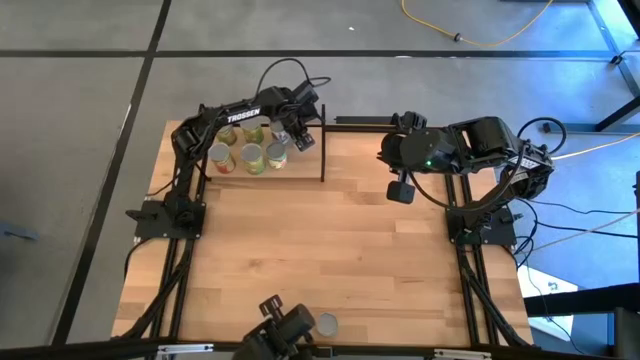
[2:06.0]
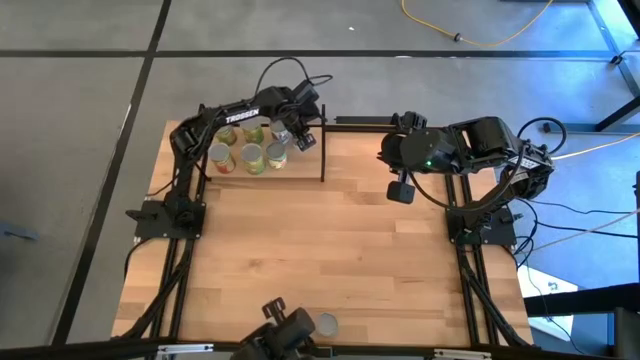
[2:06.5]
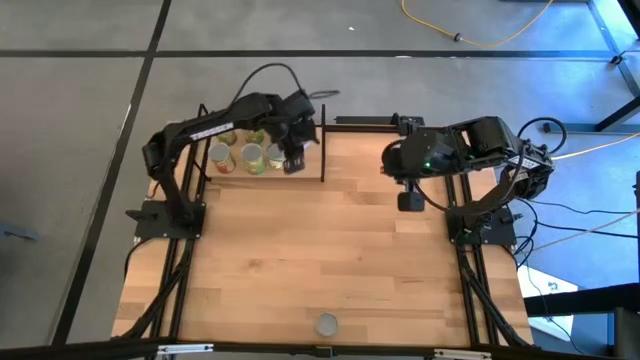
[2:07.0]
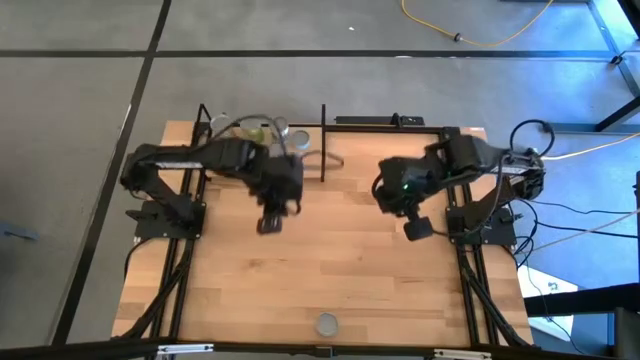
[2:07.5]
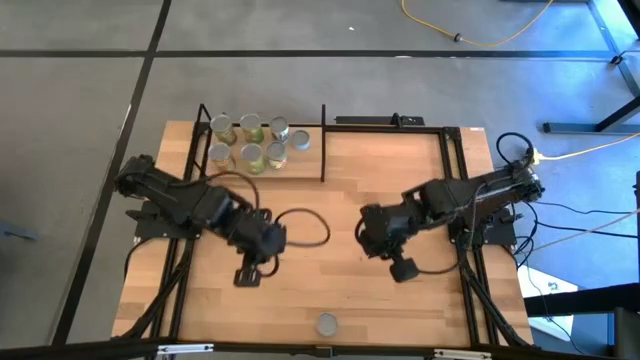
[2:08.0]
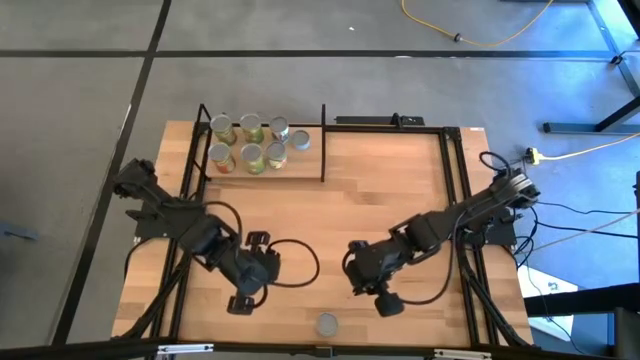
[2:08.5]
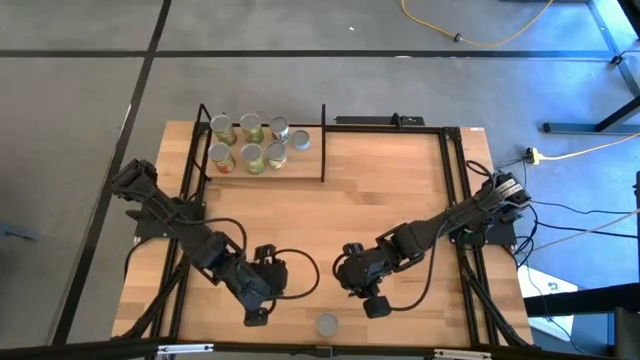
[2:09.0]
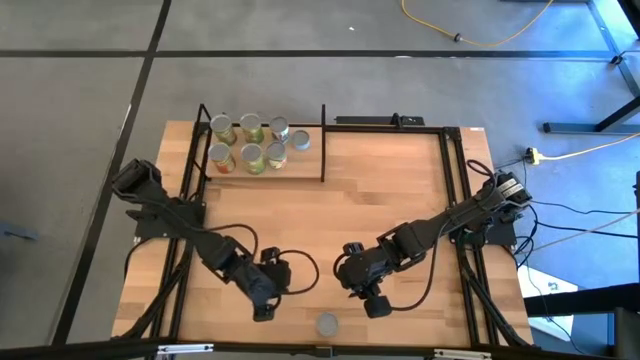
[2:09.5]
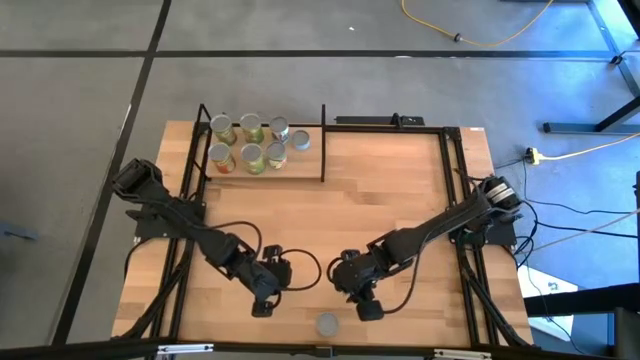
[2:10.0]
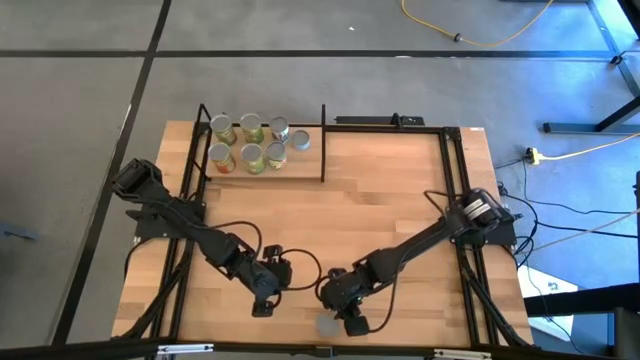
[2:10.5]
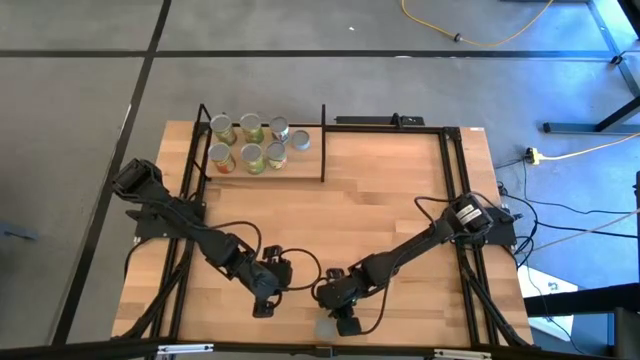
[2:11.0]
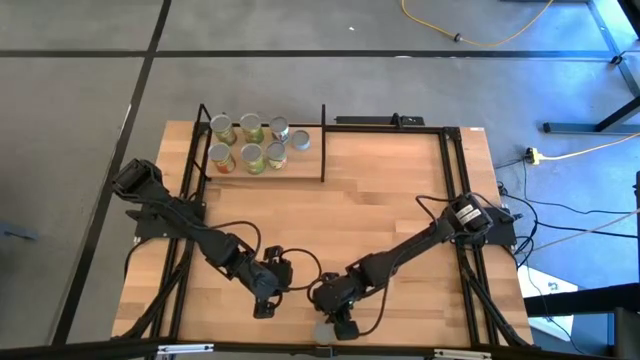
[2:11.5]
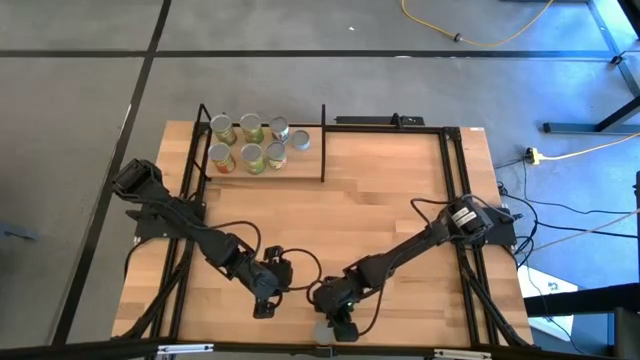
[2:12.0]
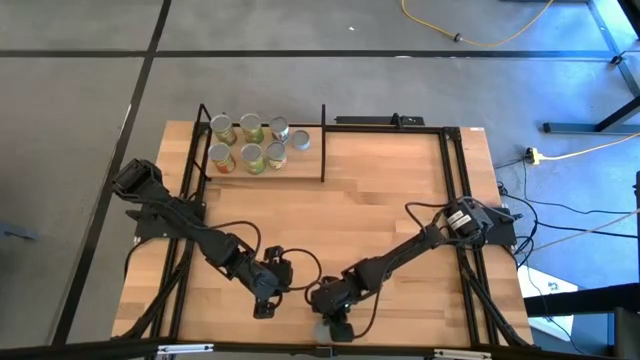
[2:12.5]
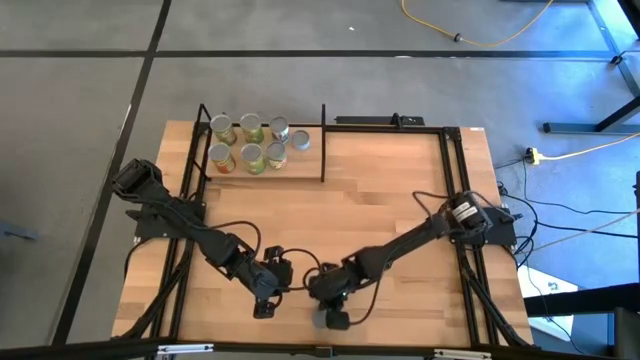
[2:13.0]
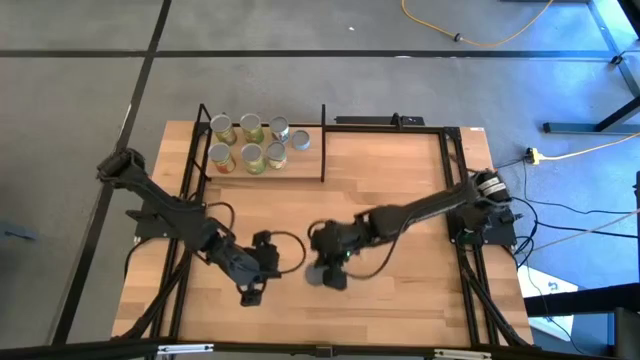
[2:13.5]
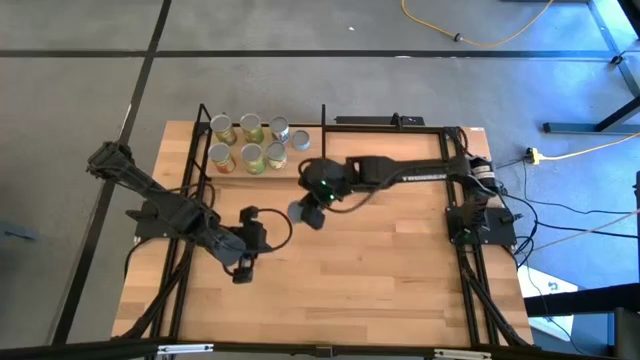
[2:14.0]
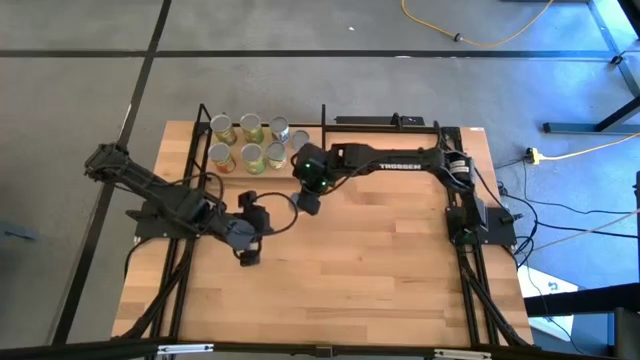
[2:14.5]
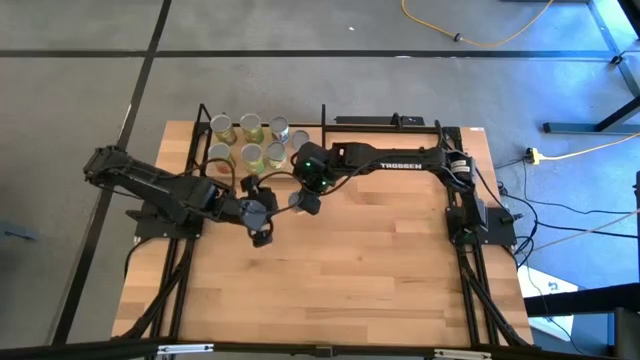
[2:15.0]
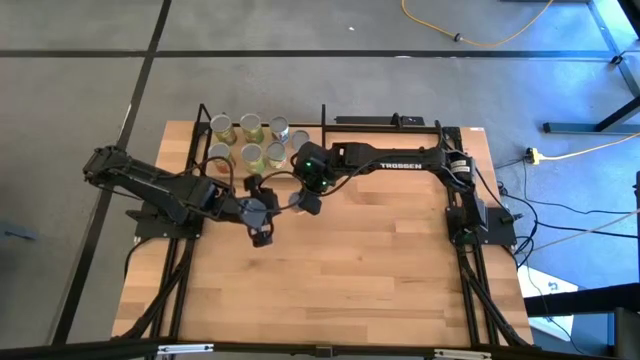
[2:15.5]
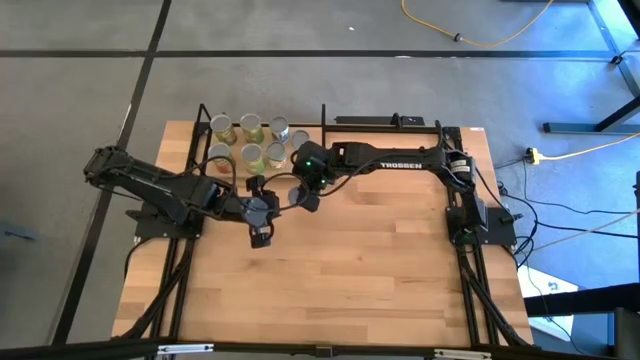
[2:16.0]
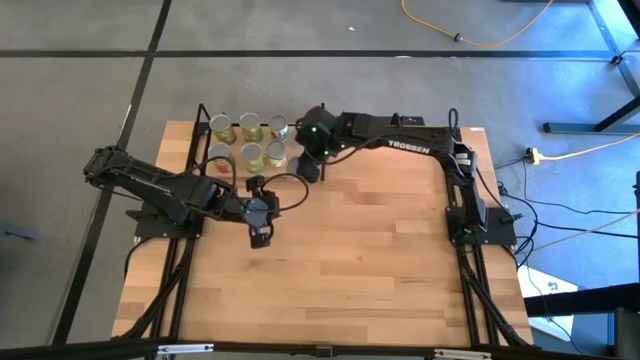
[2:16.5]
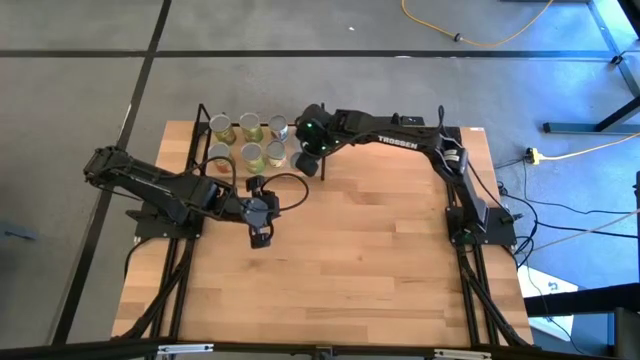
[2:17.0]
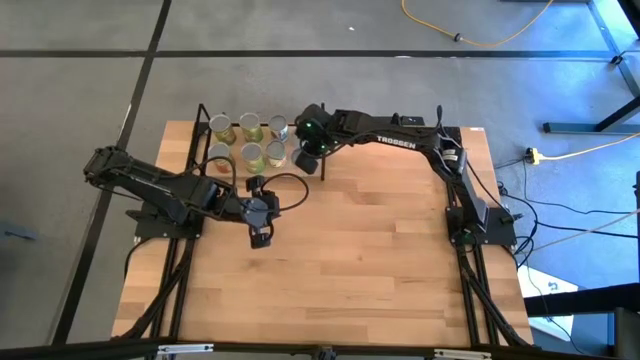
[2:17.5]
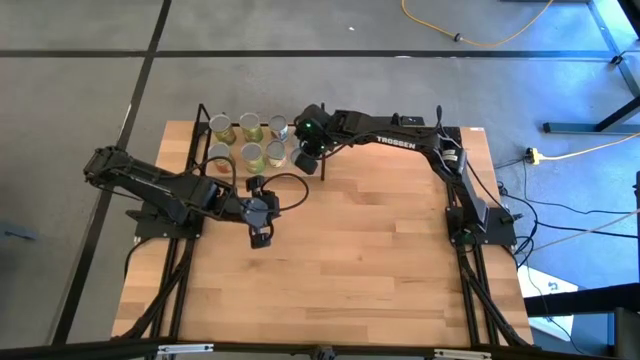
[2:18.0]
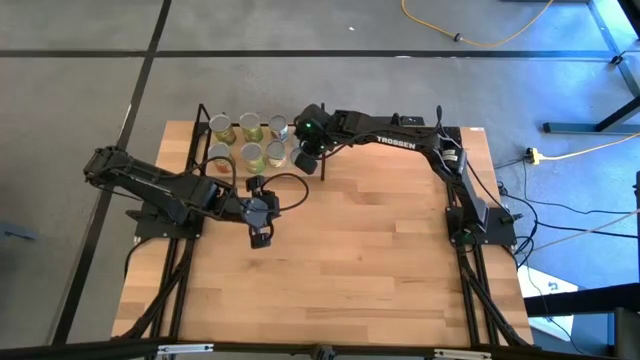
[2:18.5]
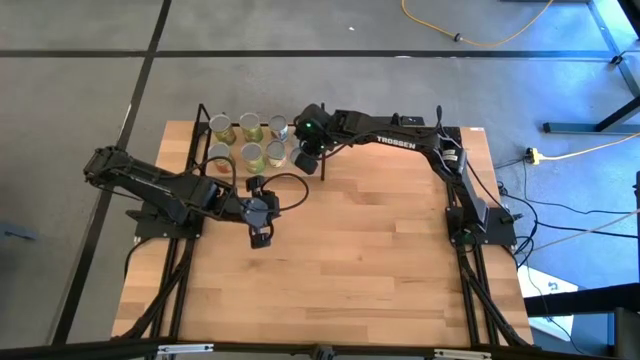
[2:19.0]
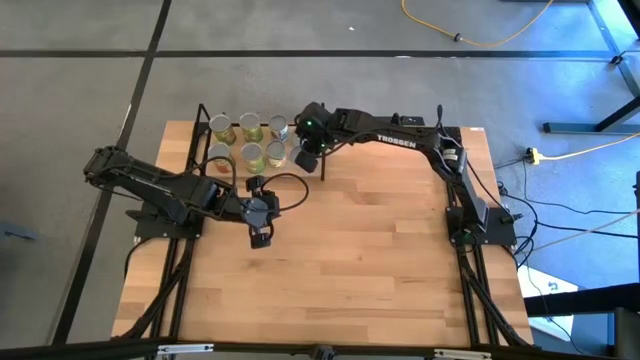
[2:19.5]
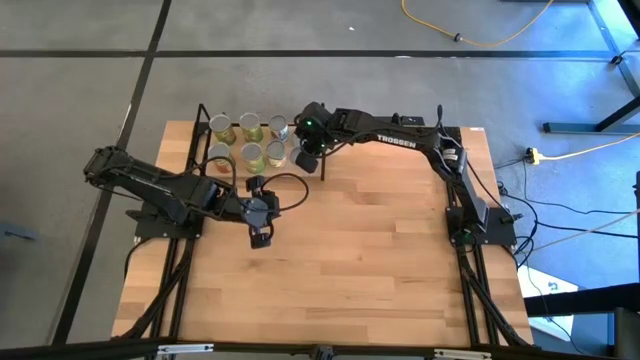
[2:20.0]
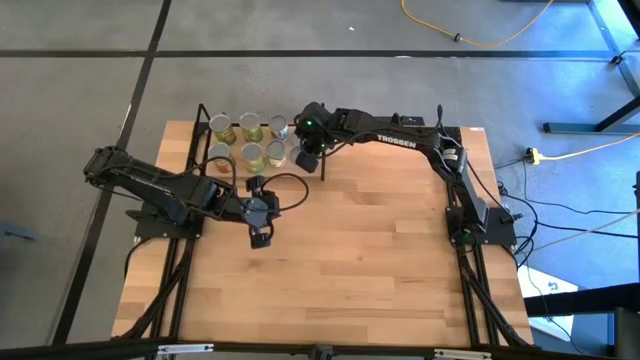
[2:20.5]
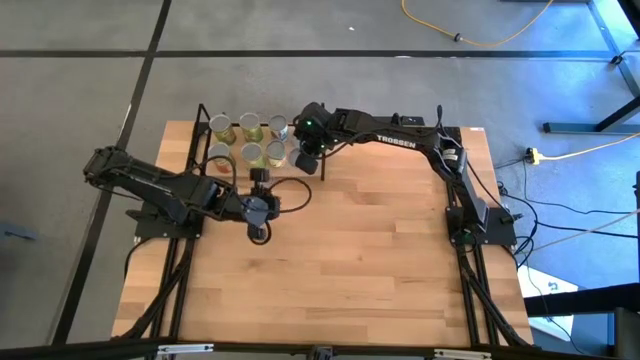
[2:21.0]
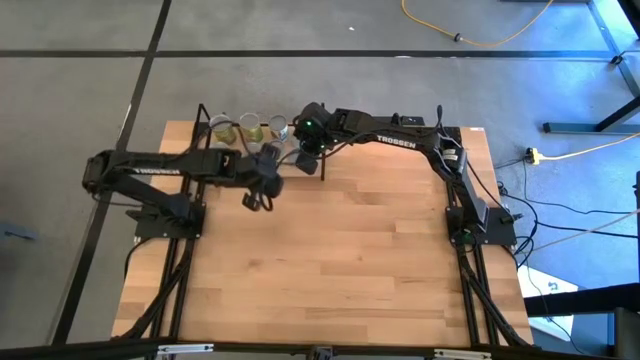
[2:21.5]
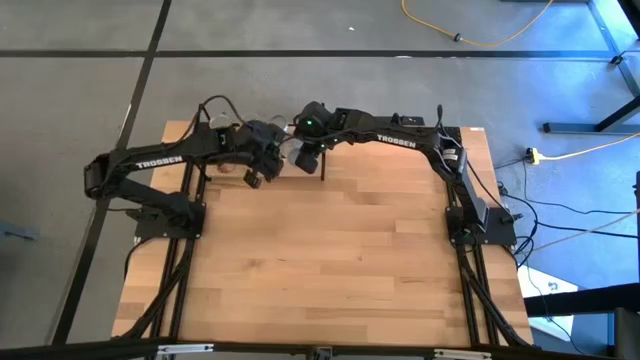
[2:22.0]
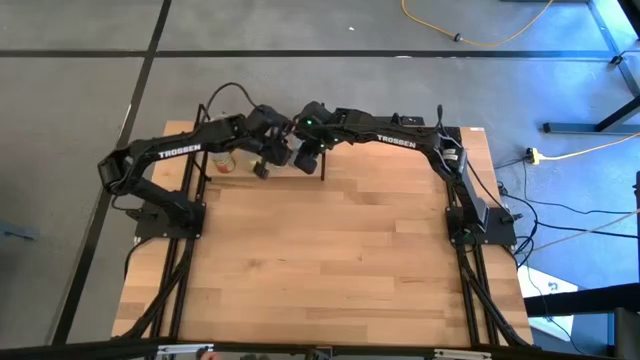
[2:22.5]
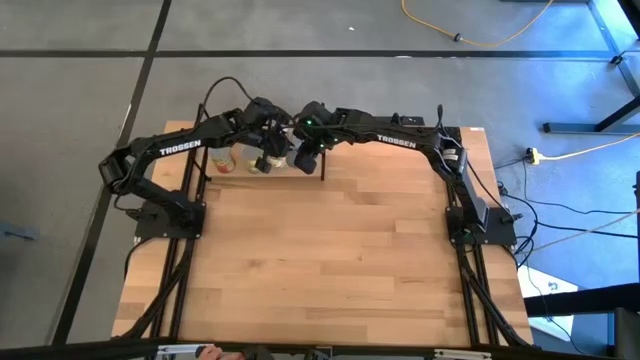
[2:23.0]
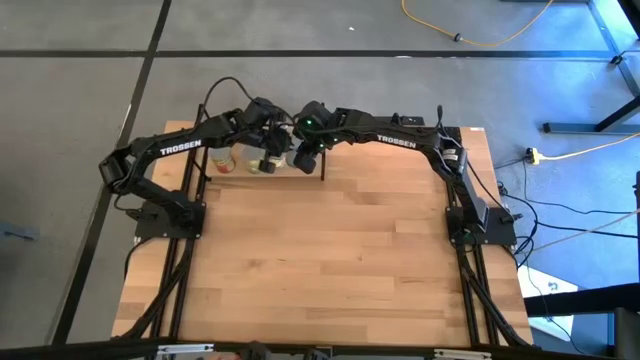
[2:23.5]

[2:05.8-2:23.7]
Task: Pick and place cans onto a shelf
Put the canned pineapple rings on the shelf

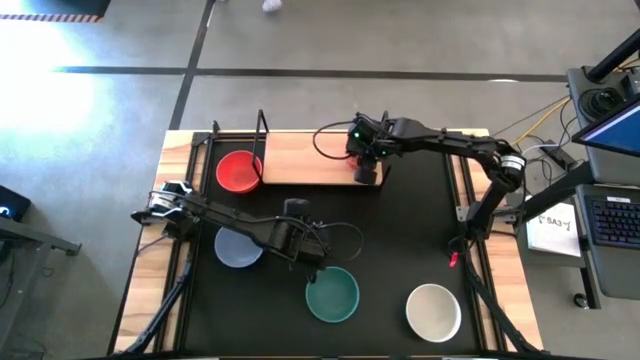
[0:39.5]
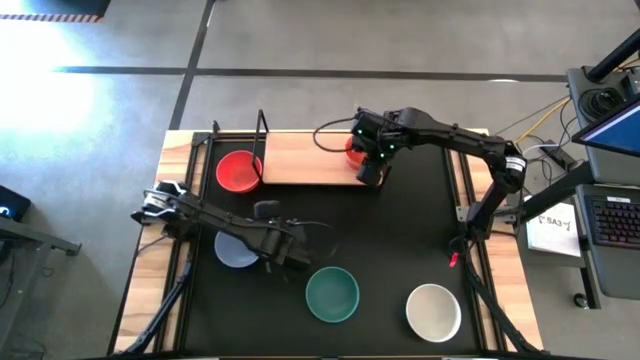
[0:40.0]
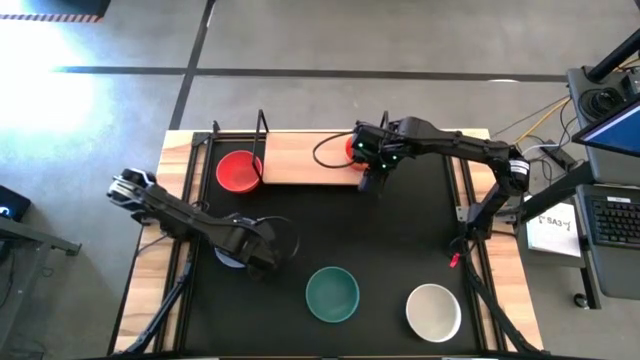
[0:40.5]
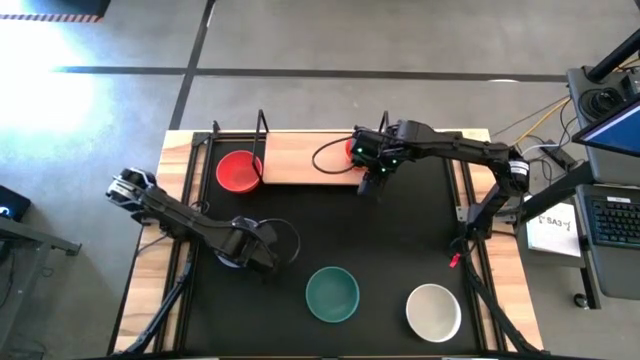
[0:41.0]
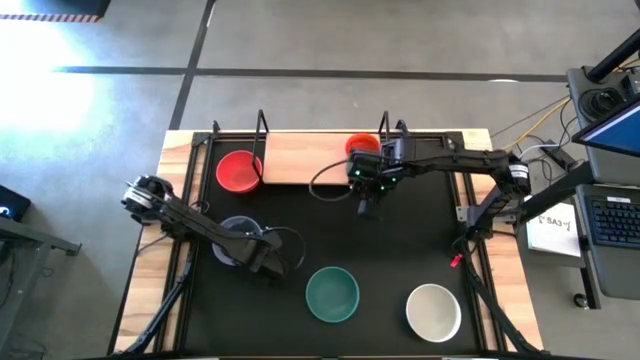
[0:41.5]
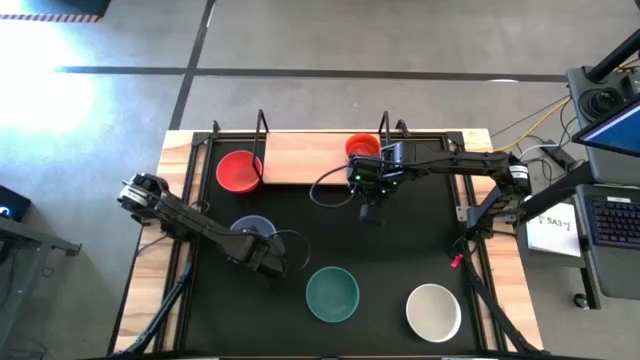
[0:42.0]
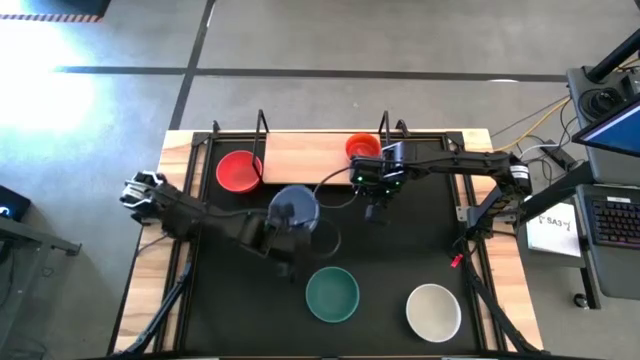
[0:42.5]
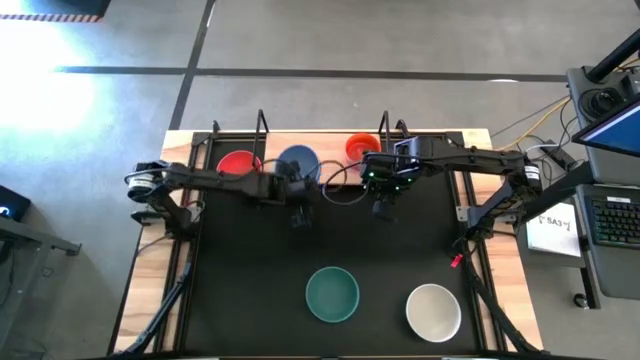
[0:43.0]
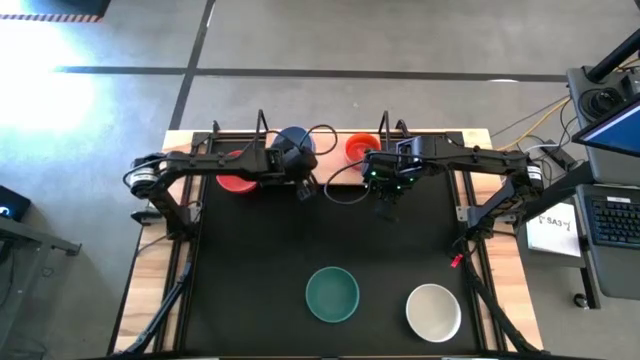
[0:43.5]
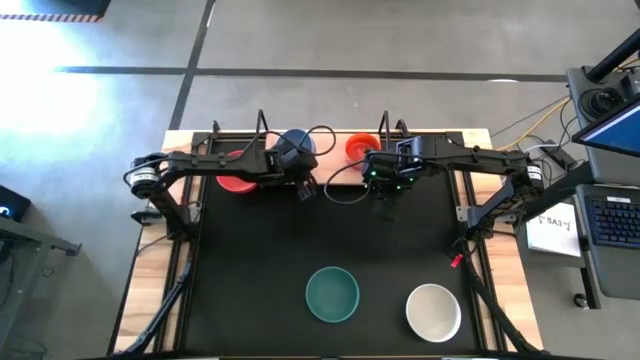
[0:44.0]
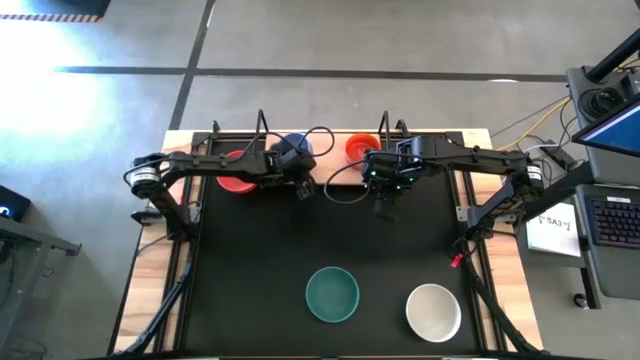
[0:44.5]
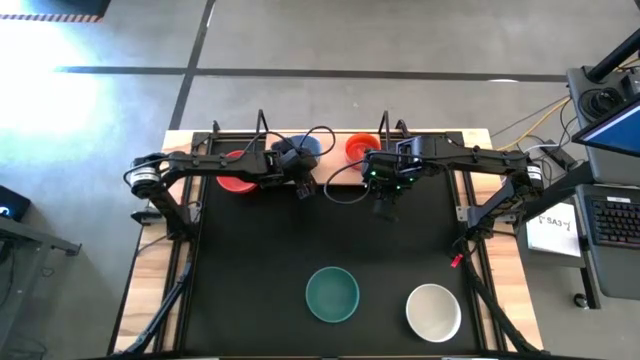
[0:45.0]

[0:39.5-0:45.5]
Task: Place and stack bowls onto a shelf
Put the blue bowl on the shelf
